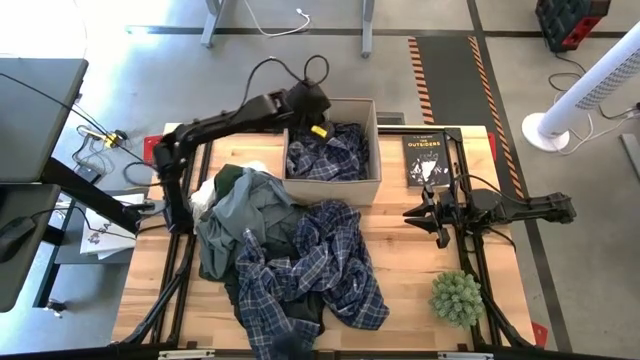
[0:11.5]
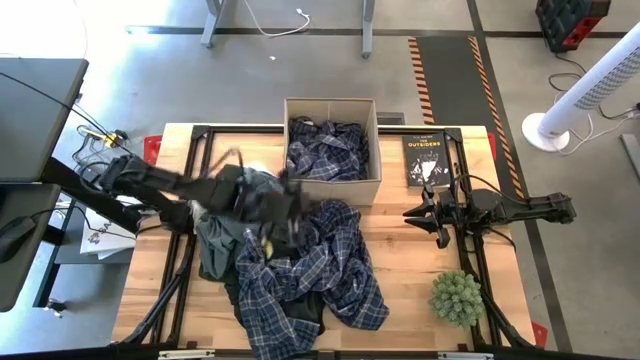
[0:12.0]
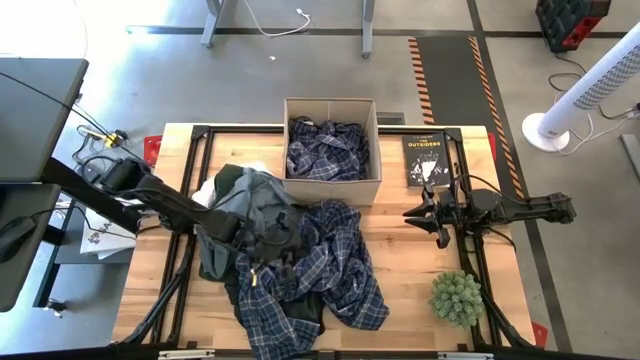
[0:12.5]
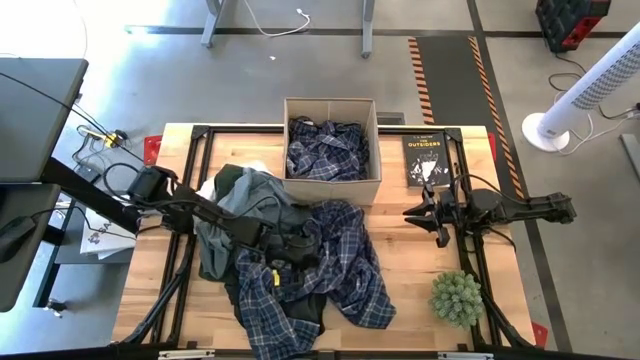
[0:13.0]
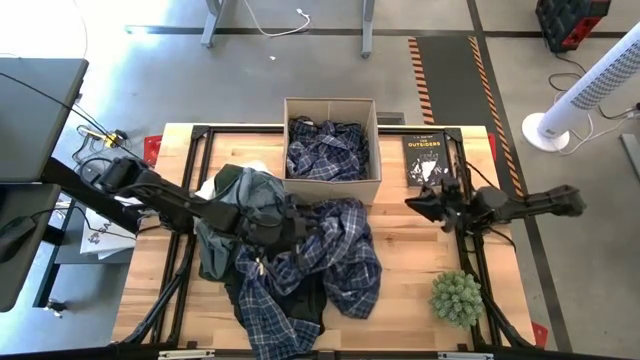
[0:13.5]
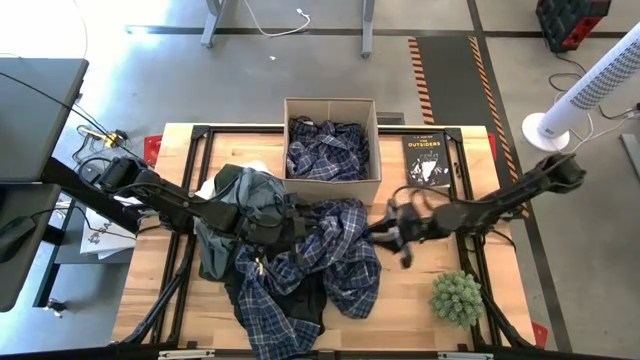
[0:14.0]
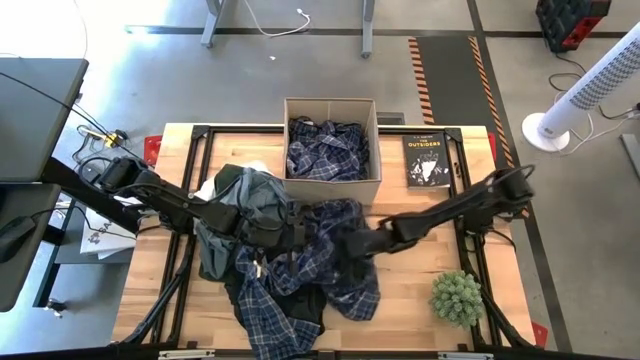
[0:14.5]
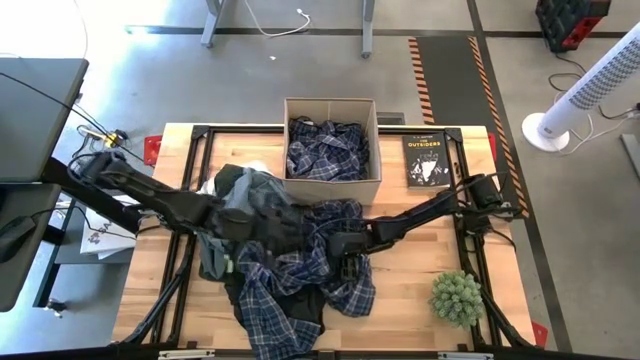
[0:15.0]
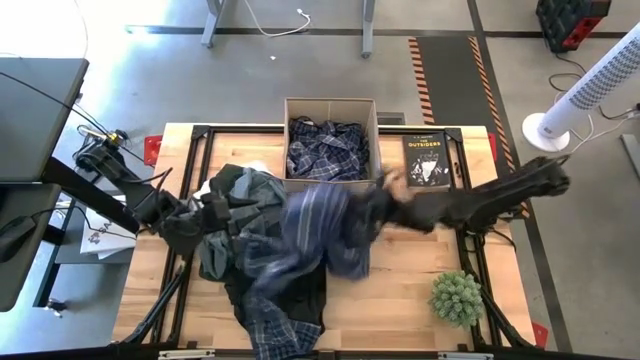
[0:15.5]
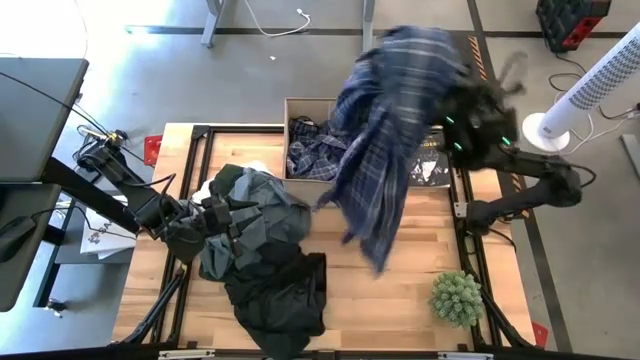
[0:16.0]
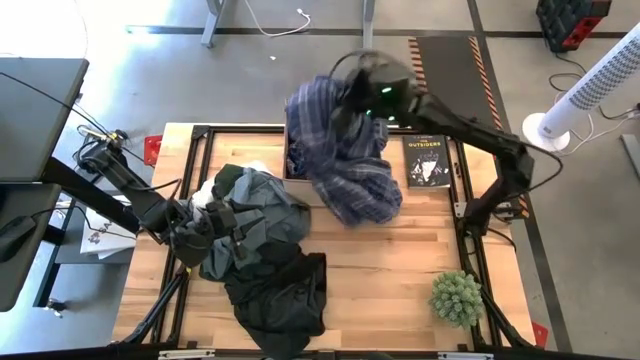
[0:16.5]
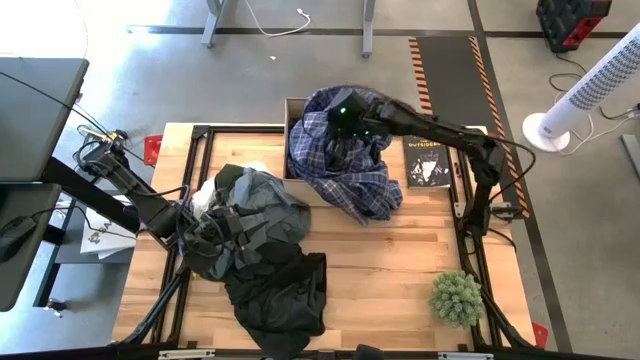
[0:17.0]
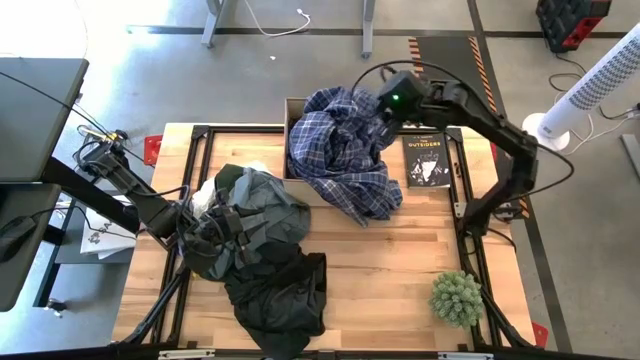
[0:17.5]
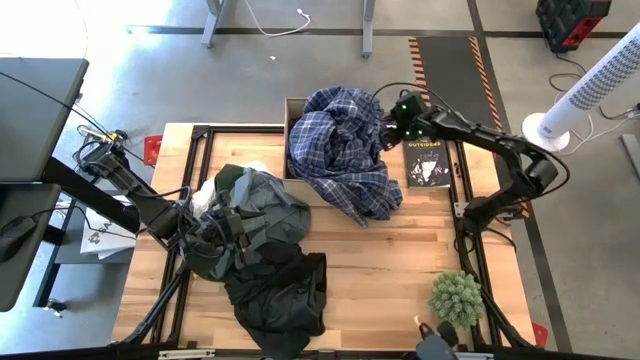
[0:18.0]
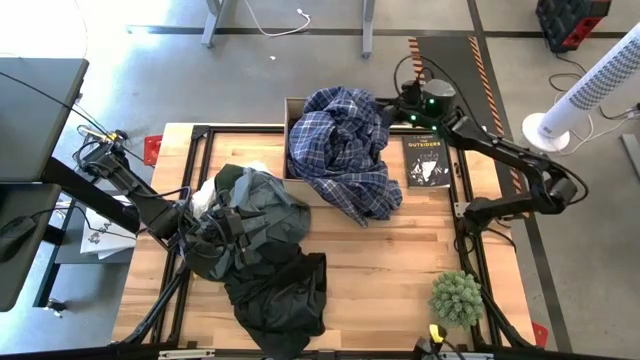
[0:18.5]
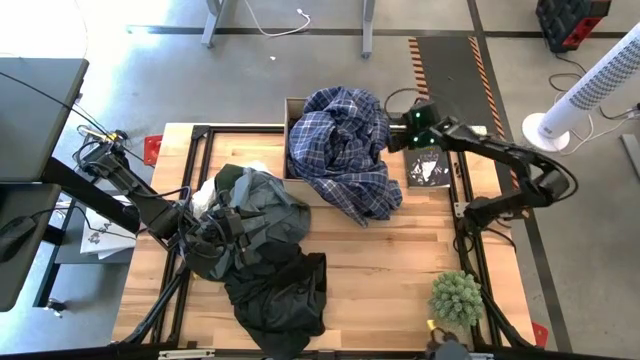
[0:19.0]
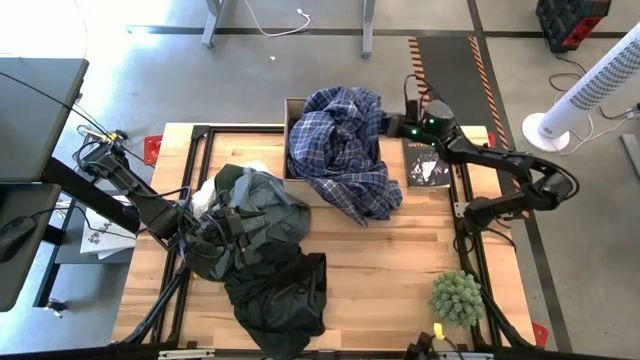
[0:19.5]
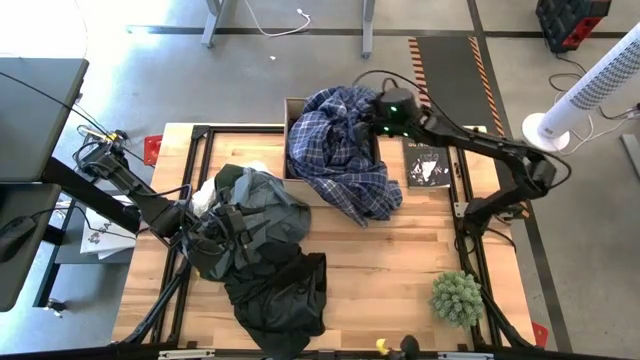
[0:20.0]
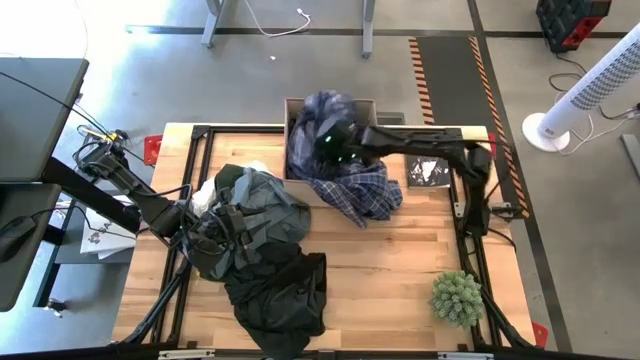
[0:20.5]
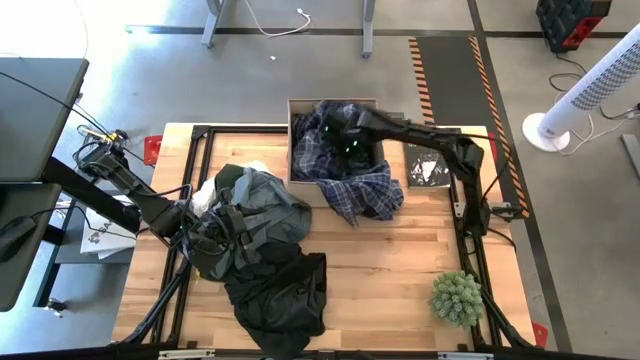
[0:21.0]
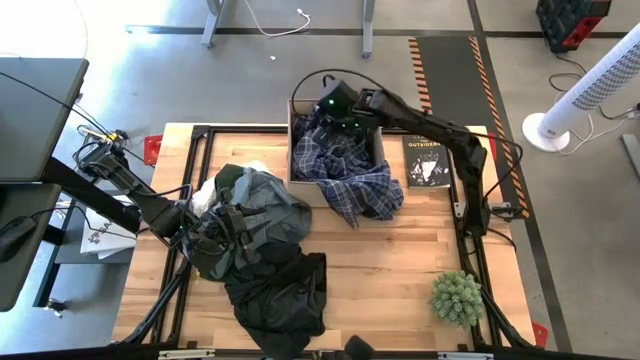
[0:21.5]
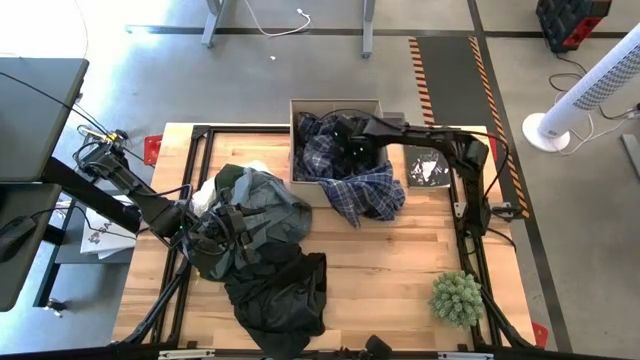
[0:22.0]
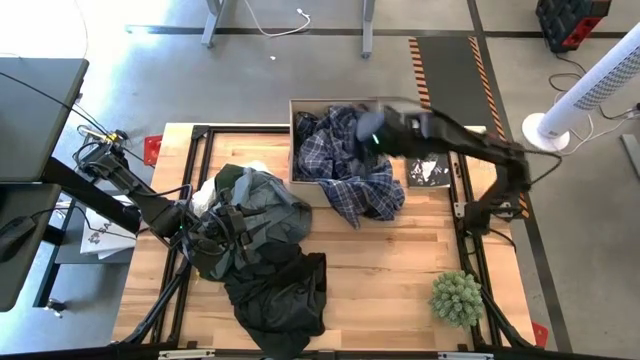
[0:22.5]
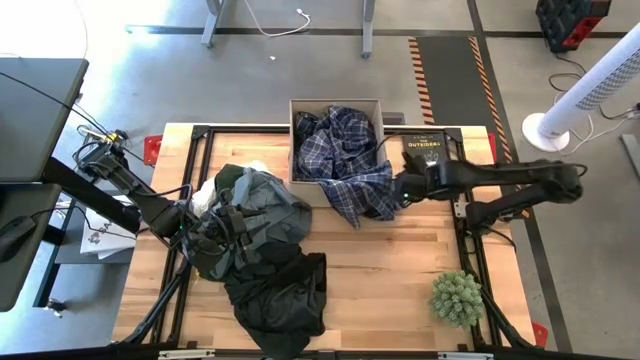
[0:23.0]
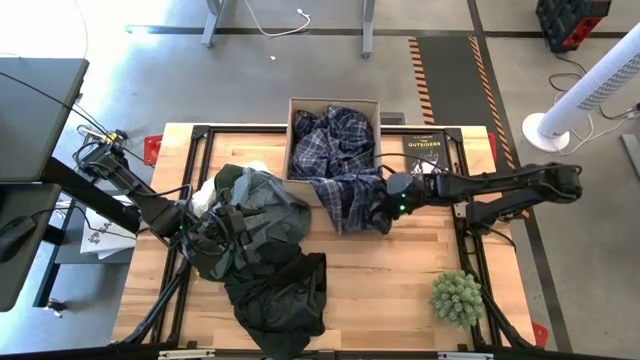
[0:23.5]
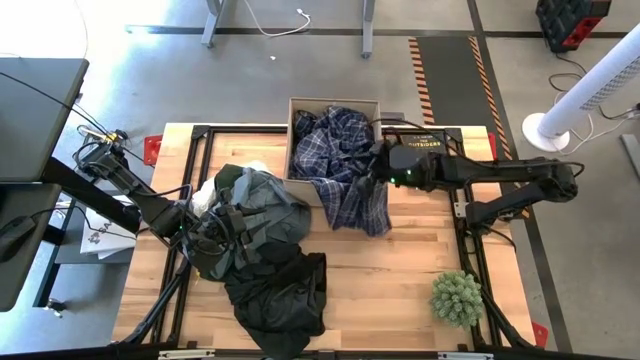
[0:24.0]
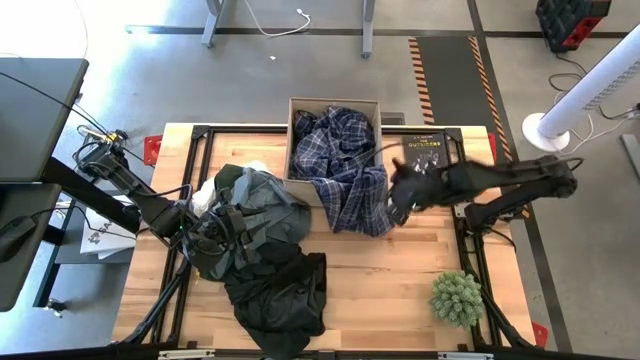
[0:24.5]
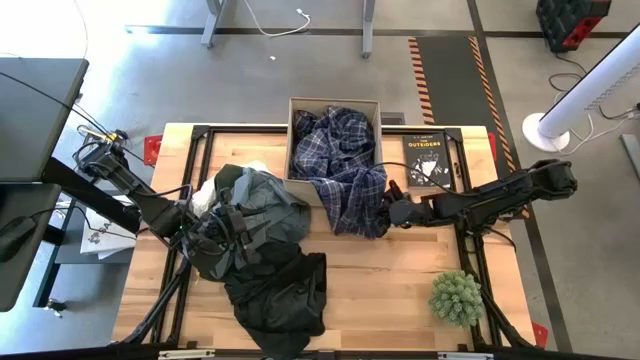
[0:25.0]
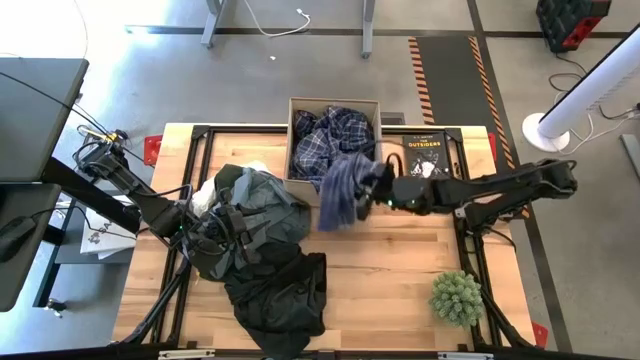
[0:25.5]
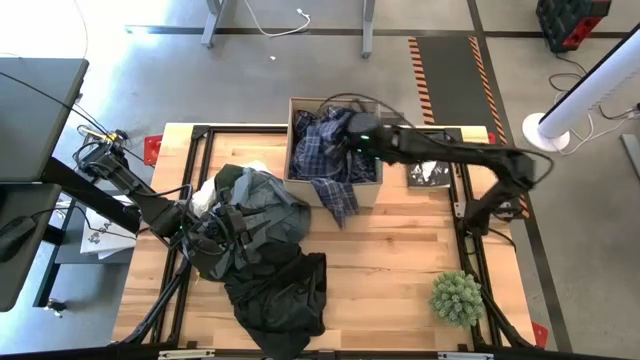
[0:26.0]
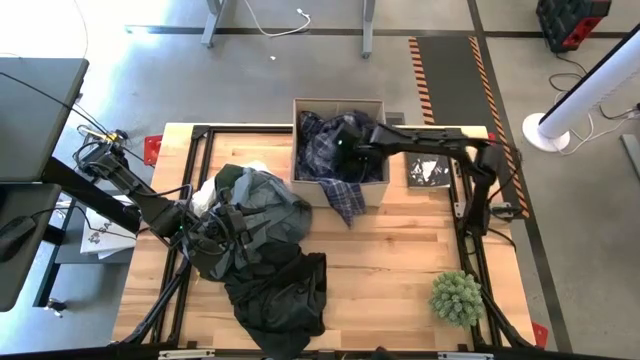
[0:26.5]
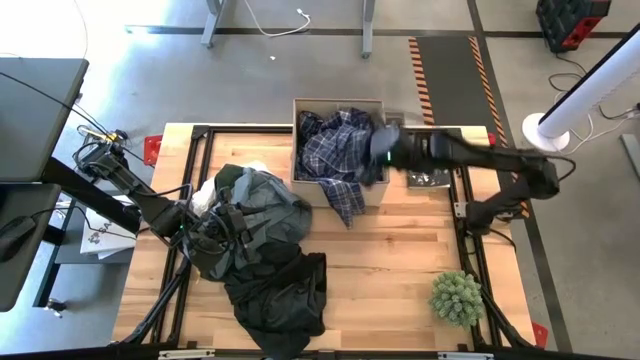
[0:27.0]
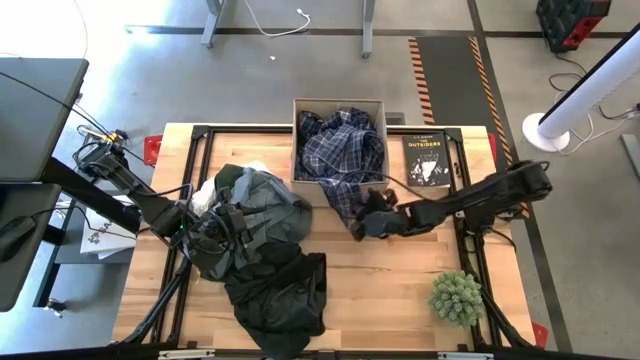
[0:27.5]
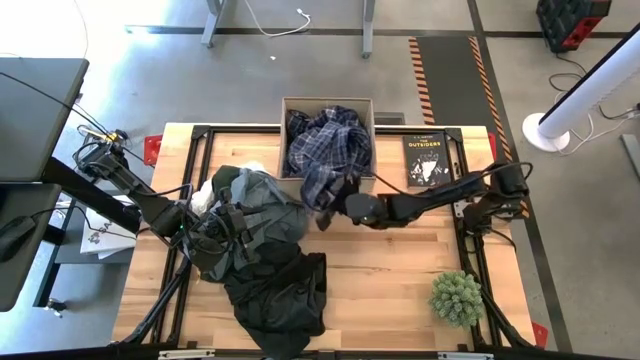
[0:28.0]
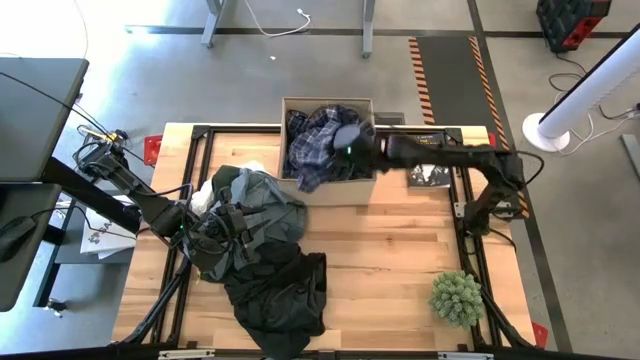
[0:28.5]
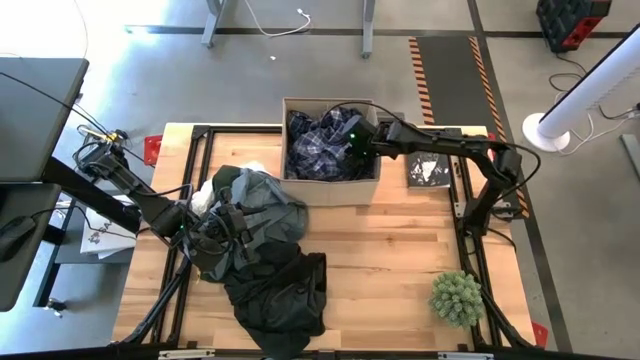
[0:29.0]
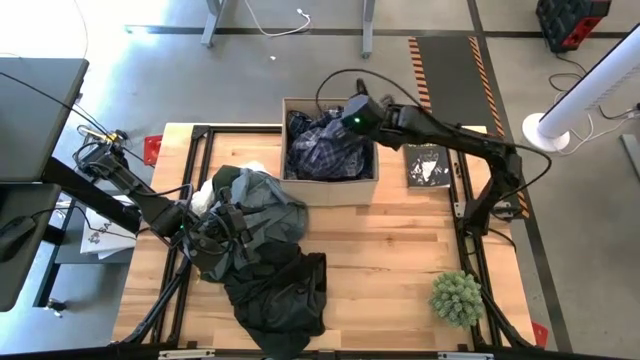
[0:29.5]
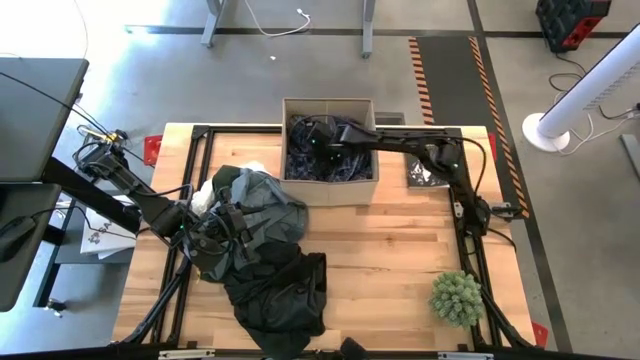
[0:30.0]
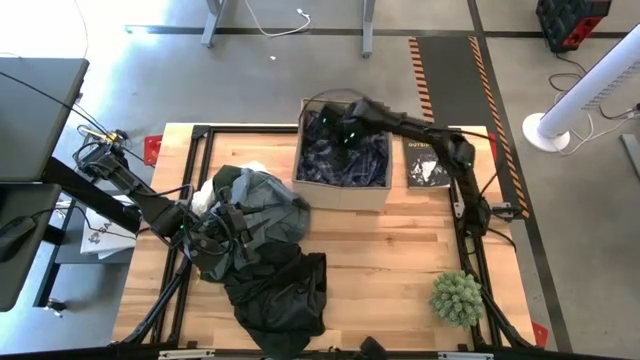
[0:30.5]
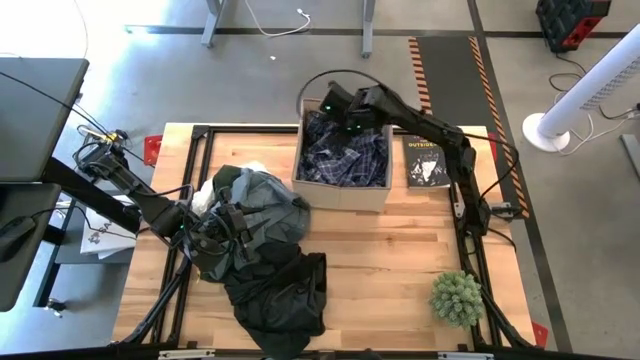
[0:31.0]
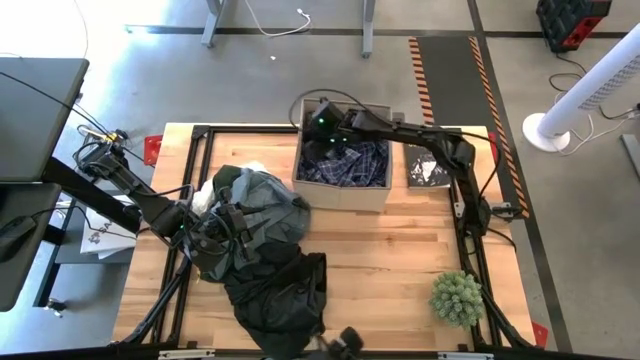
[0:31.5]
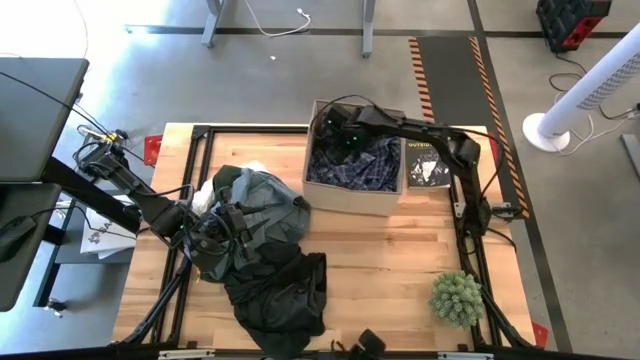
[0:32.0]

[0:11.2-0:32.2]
Task: Sort clothes
Put the blue pattern pajama into the laundry organizer
